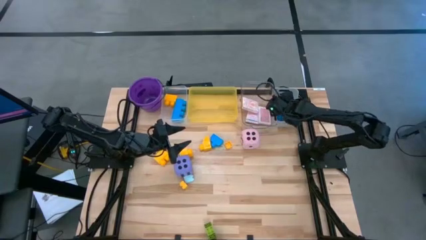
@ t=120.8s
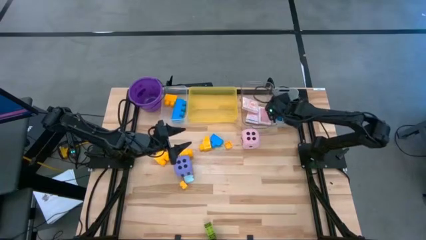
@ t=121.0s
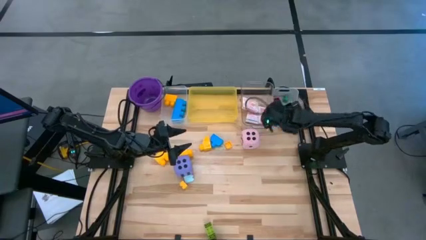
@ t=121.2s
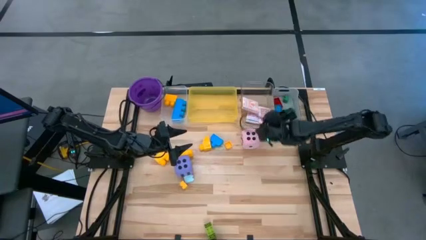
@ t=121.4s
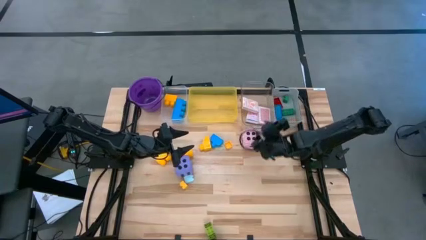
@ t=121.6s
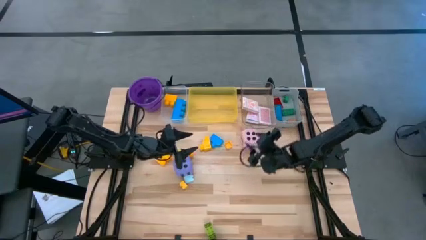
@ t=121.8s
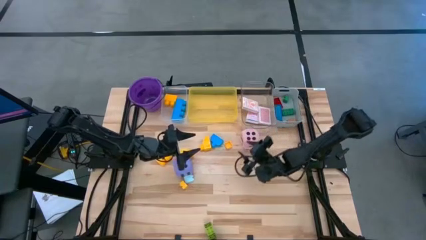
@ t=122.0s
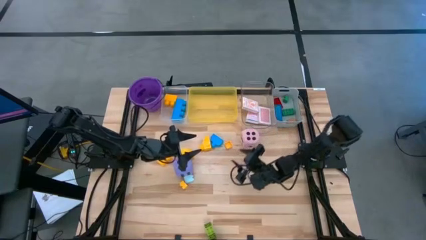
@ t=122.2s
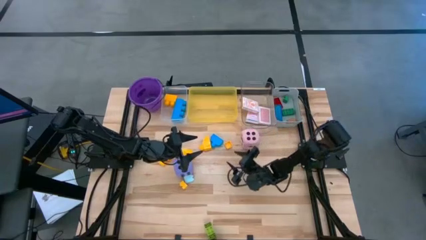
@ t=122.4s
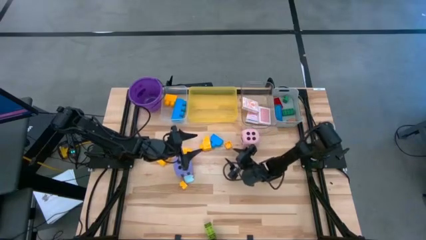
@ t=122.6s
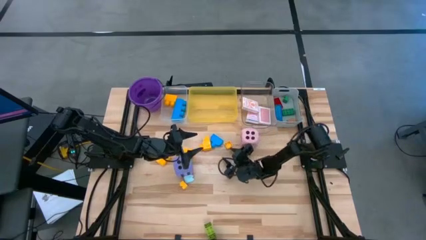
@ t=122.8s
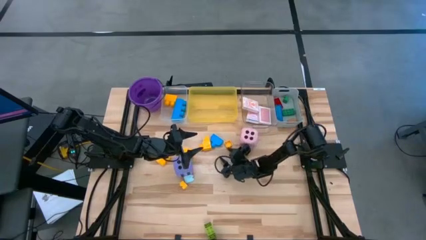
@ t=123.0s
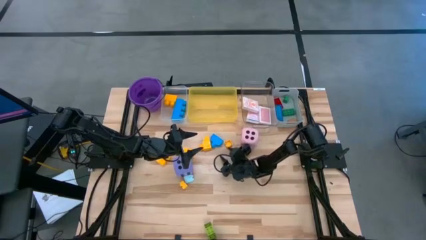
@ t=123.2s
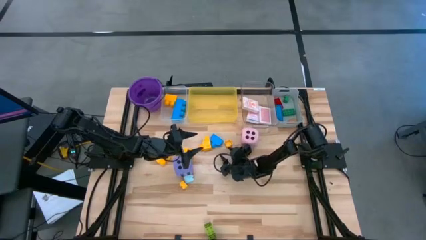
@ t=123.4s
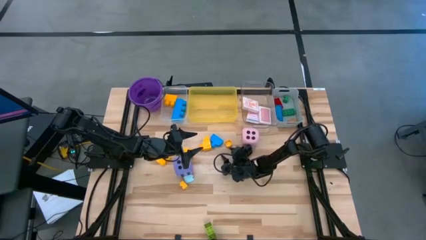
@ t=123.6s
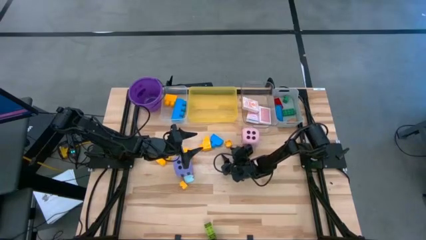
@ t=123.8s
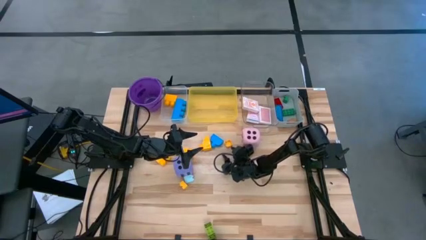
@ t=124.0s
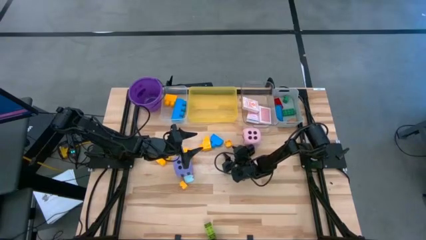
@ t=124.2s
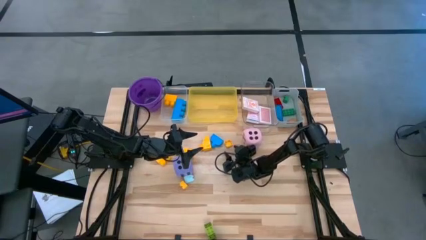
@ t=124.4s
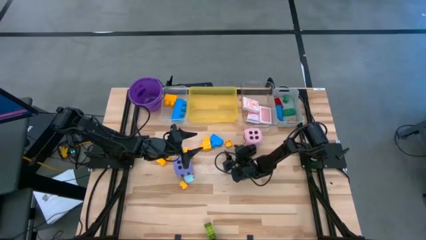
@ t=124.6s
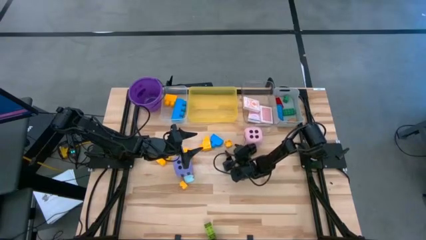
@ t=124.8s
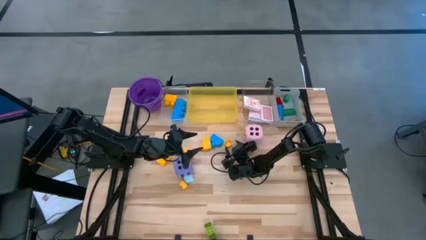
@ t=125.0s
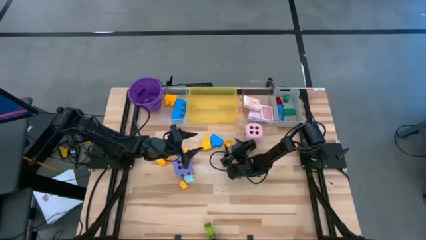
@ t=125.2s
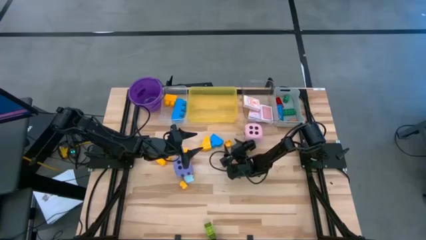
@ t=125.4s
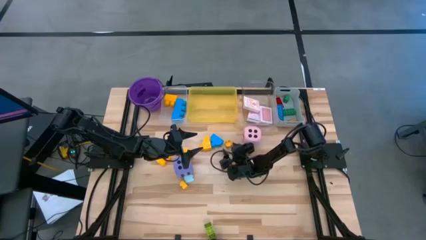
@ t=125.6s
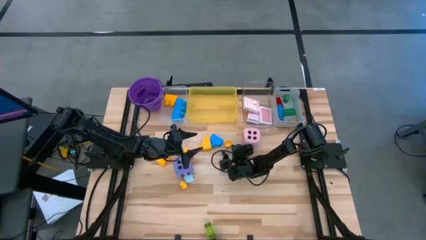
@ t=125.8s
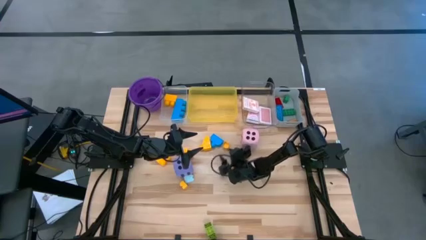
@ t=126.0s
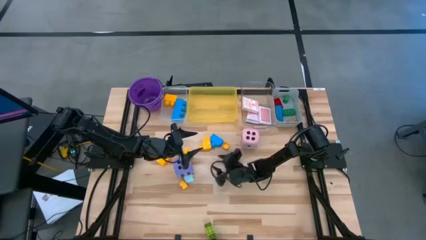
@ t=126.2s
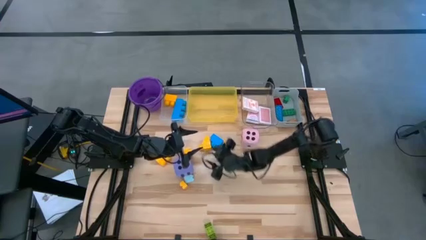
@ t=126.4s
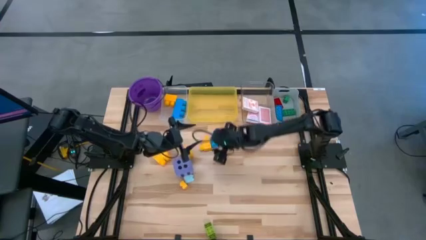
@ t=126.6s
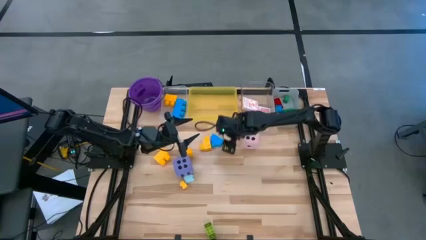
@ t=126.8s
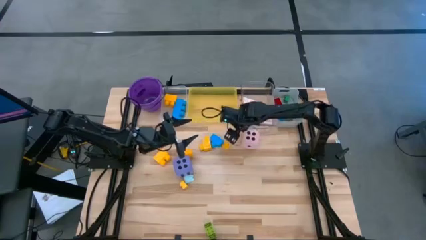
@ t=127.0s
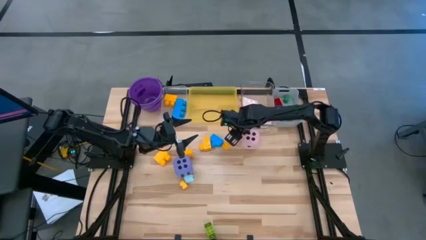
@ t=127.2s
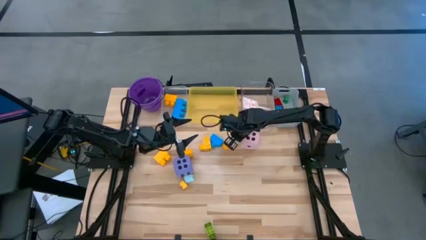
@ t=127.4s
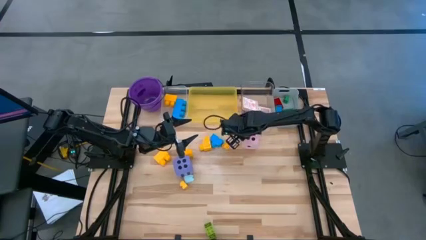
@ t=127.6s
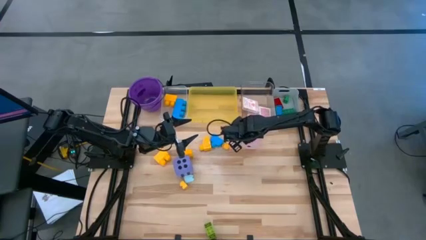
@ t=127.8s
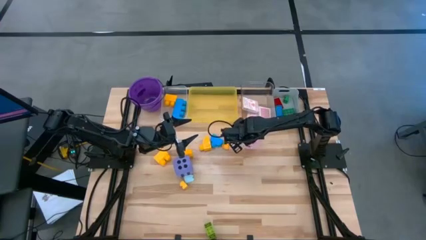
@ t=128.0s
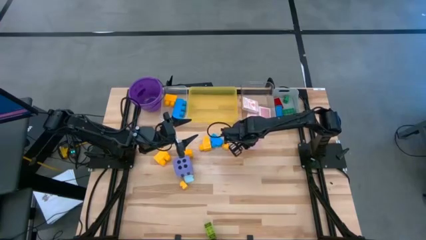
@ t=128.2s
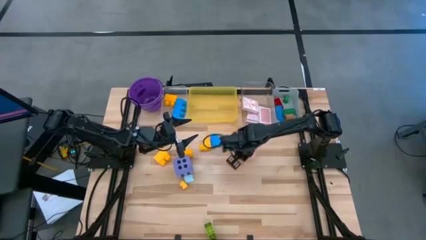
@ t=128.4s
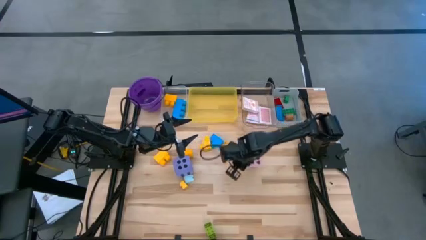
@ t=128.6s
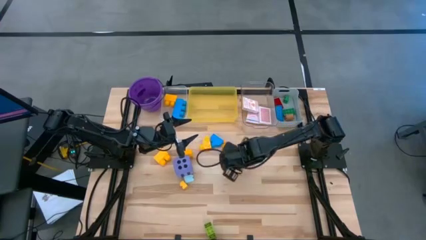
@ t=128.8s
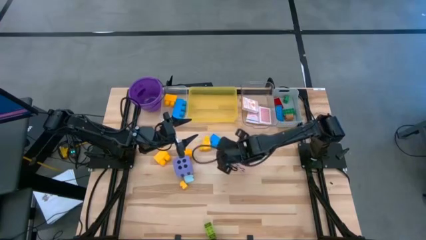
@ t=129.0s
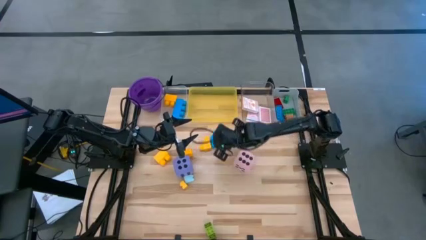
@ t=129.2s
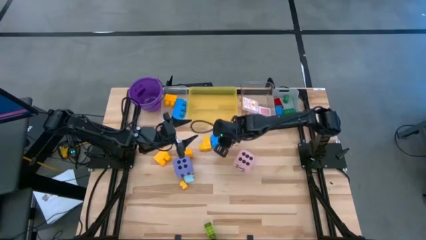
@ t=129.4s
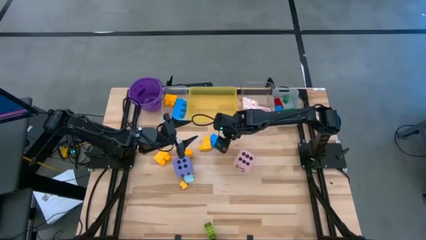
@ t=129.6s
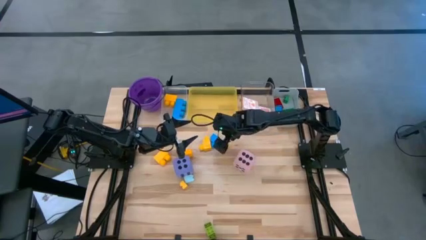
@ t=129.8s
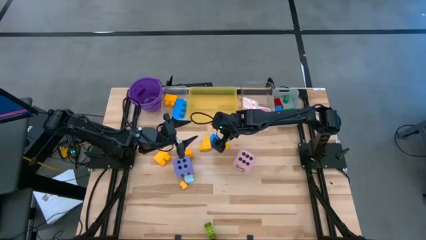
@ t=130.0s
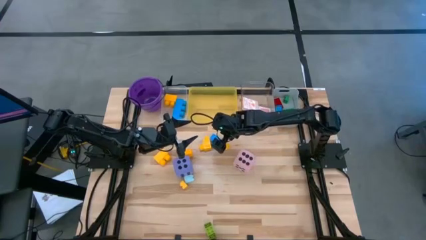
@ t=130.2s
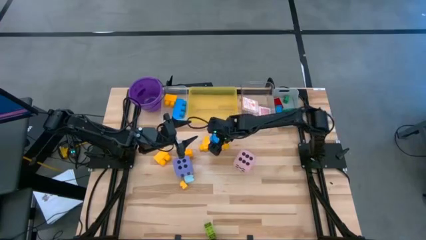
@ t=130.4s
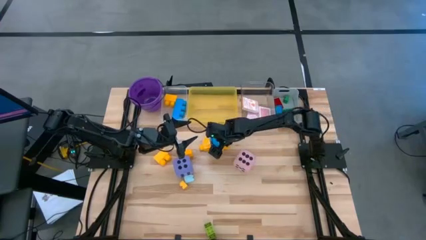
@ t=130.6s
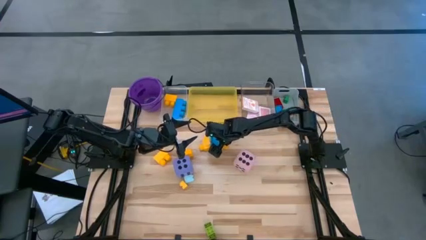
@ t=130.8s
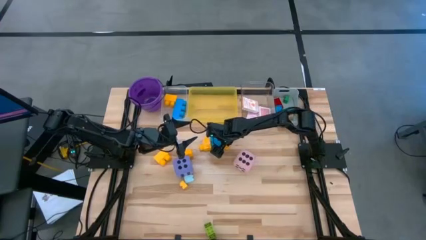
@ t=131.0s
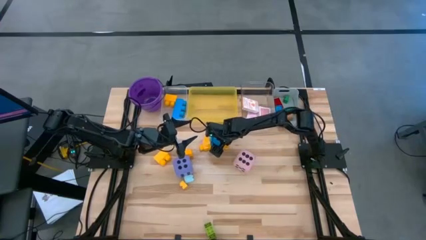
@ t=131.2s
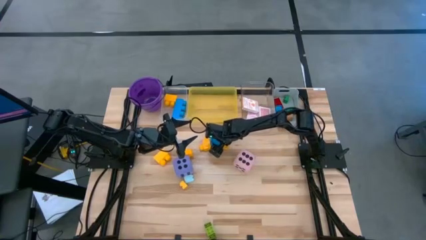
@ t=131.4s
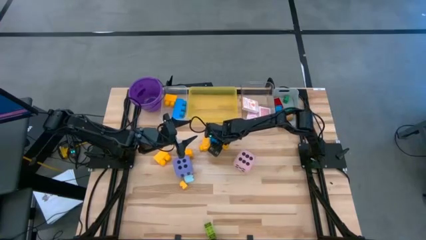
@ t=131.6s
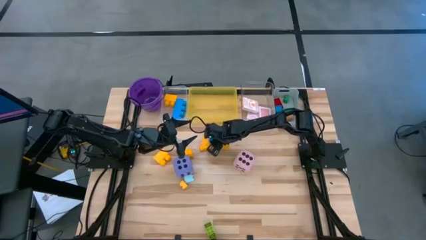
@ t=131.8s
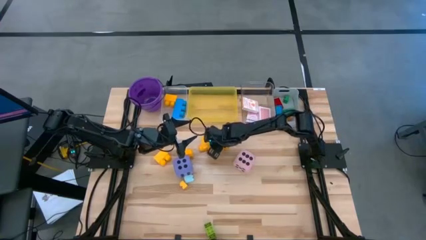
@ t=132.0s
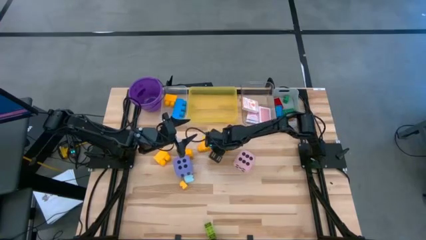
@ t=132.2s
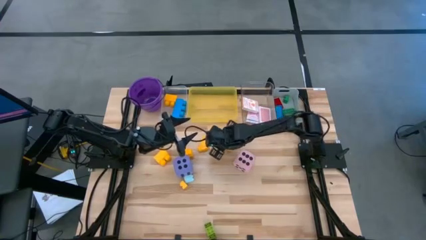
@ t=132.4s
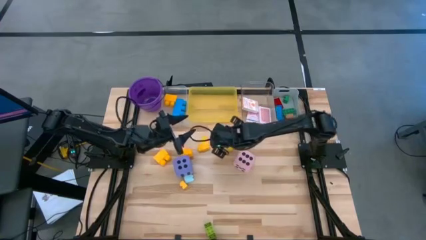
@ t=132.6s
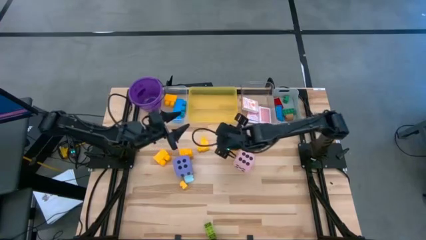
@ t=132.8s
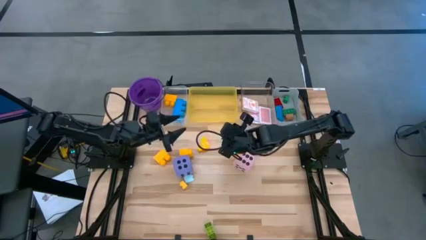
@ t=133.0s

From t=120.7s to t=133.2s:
Task: Pick & Place Toys
Put the large blue game piece into the white transparent bin

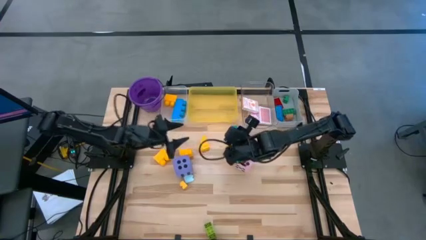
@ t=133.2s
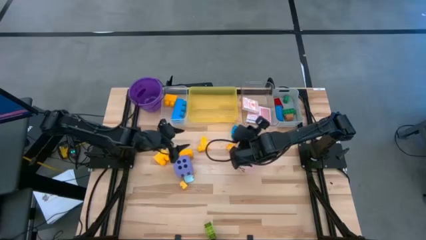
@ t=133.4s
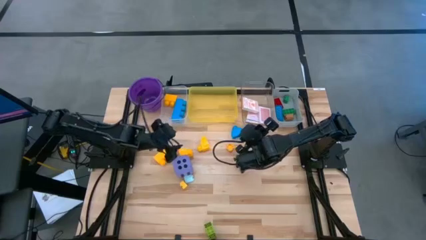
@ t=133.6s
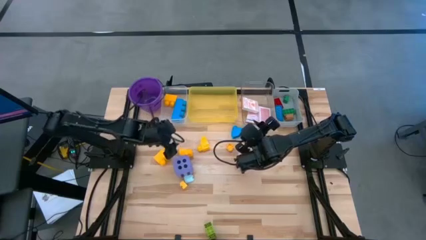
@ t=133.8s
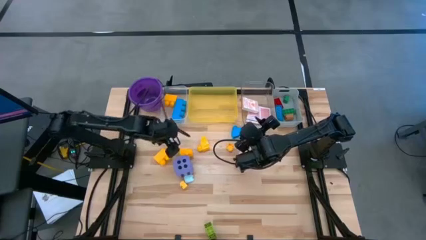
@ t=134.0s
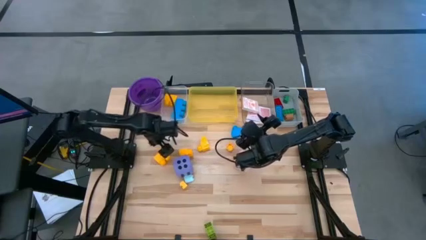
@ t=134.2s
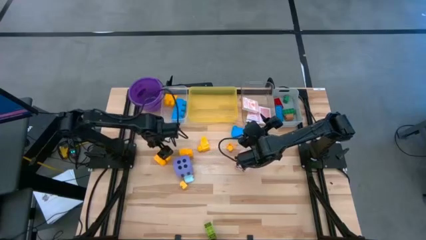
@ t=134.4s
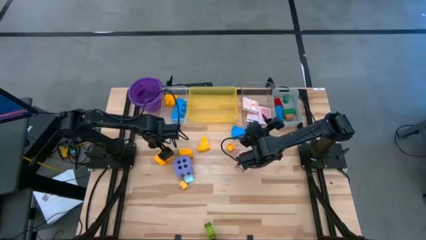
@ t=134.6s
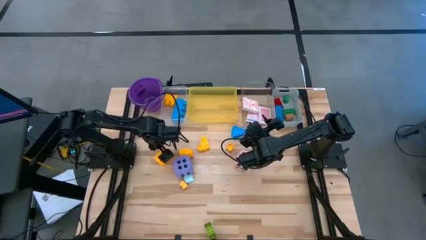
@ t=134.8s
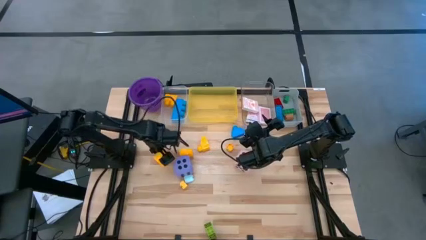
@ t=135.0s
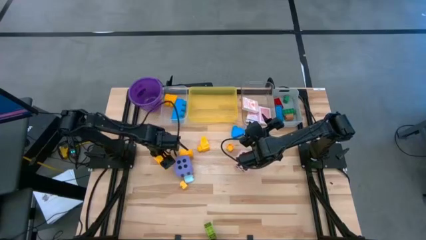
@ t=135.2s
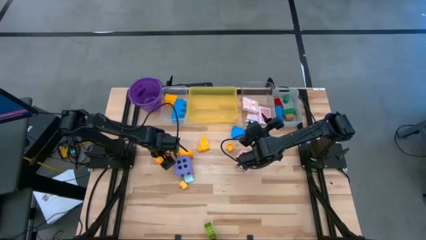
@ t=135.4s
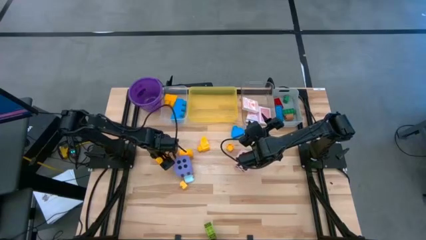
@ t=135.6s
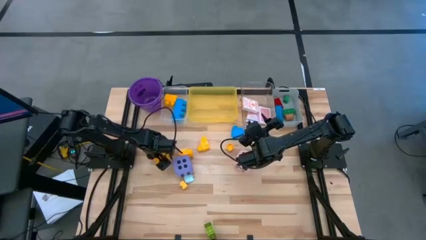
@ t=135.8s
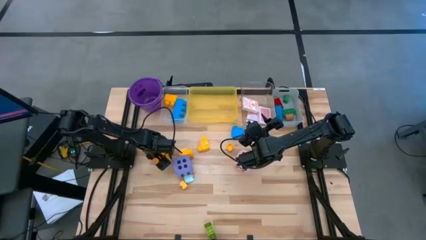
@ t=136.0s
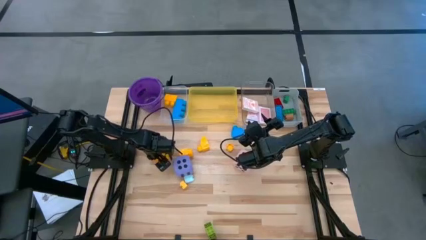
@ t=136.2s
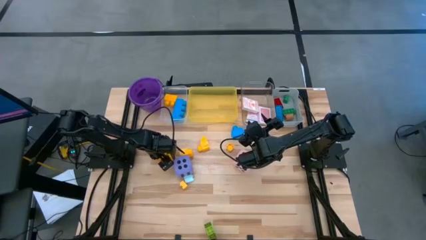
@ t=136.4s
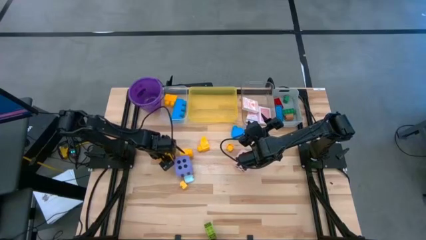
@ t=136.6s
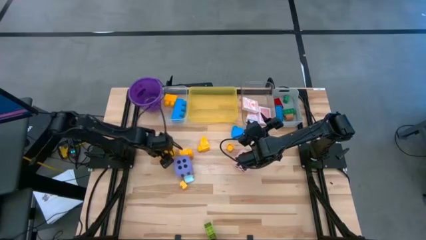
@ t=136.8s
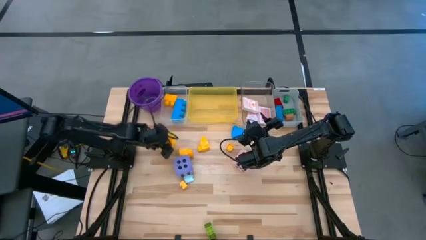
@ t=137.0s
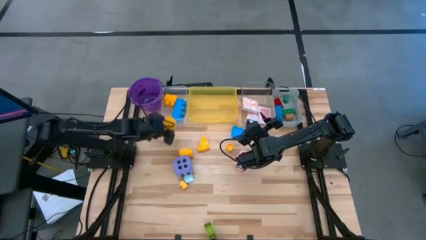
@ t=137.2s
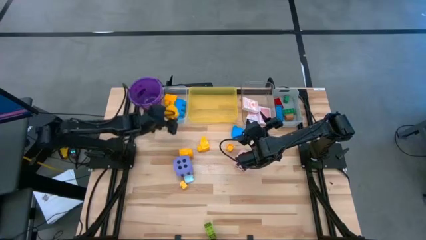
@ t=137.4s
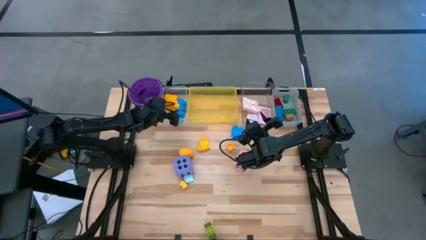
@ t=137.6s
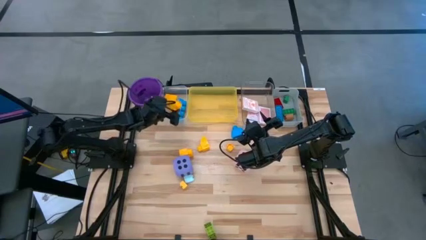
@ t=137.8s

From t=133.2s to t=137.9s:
Put the left large yellow game piece into the white transparent bin
